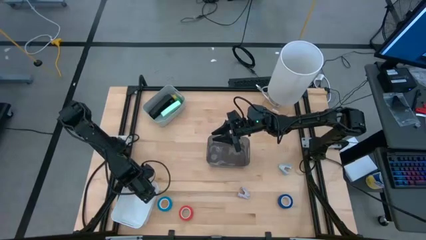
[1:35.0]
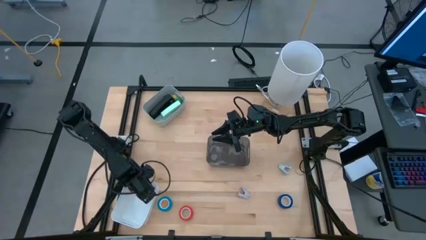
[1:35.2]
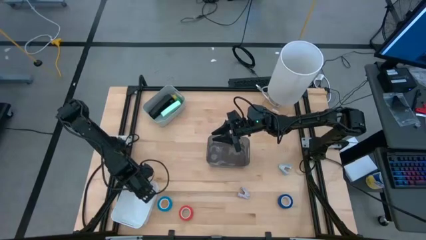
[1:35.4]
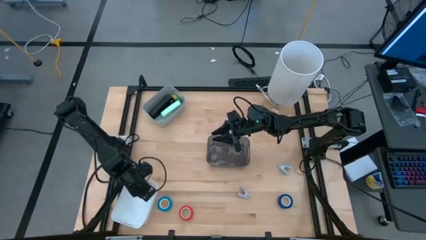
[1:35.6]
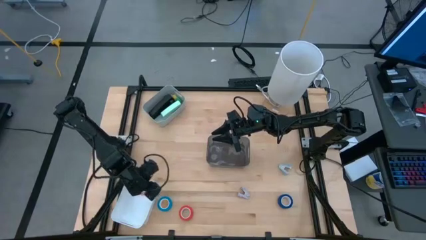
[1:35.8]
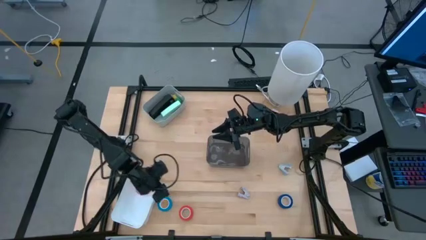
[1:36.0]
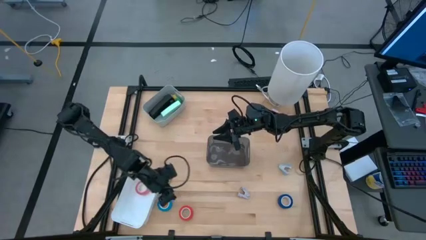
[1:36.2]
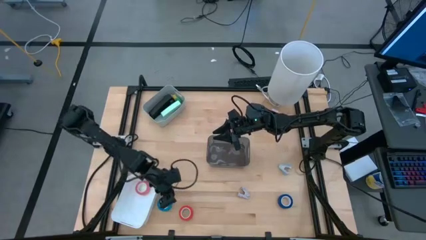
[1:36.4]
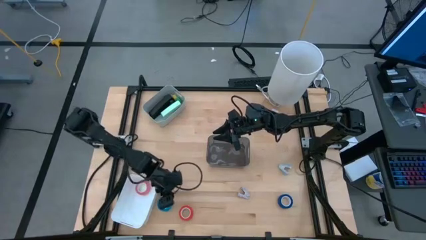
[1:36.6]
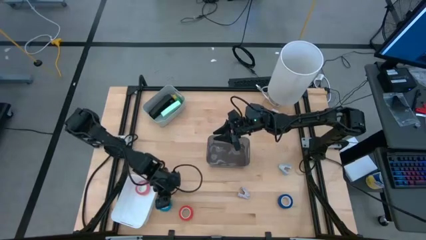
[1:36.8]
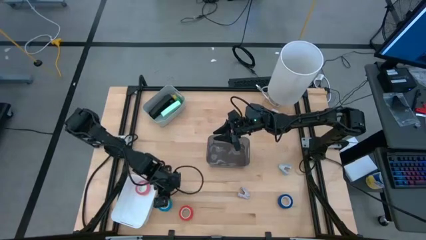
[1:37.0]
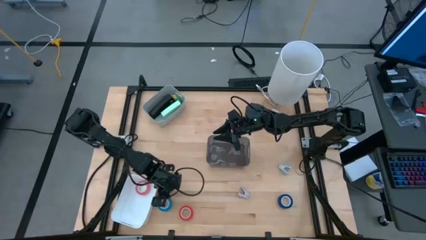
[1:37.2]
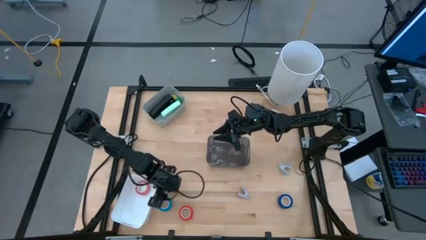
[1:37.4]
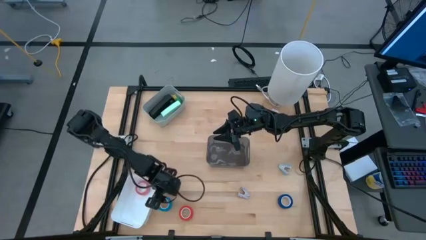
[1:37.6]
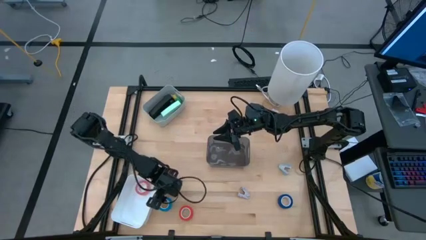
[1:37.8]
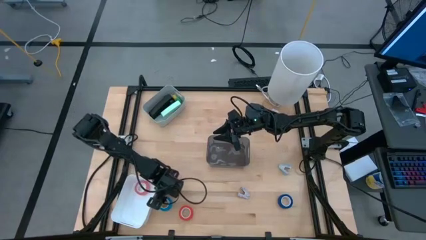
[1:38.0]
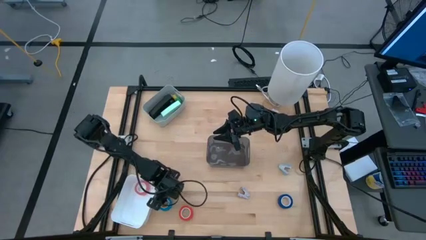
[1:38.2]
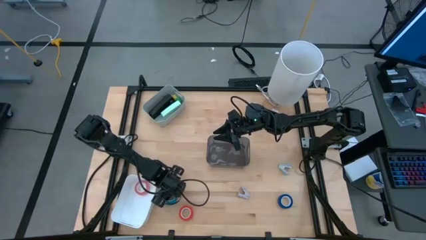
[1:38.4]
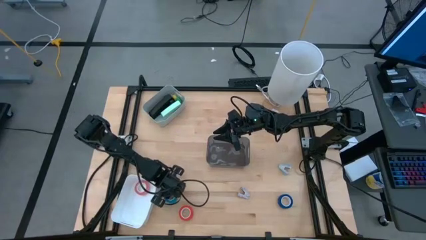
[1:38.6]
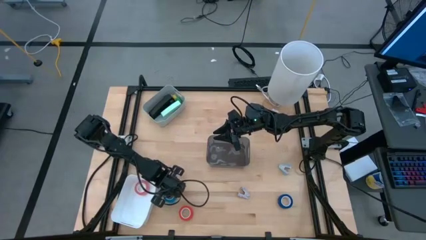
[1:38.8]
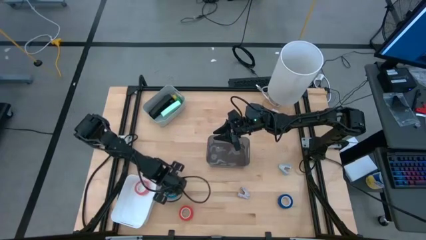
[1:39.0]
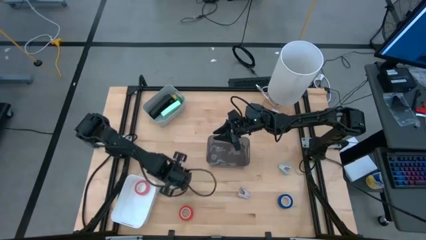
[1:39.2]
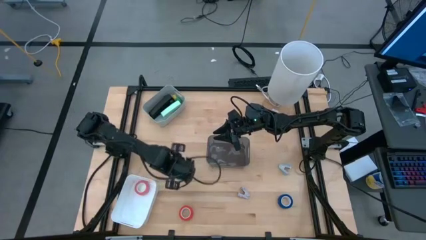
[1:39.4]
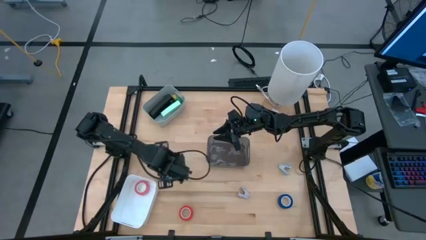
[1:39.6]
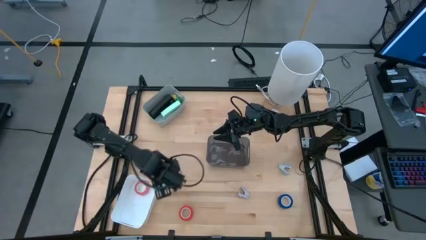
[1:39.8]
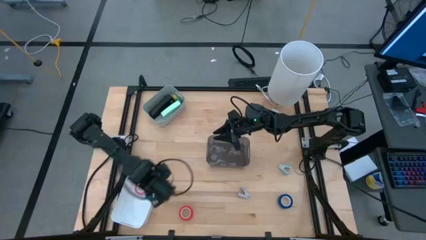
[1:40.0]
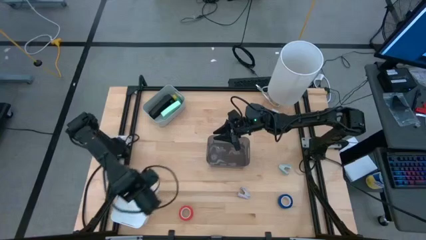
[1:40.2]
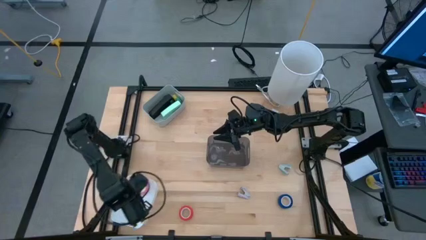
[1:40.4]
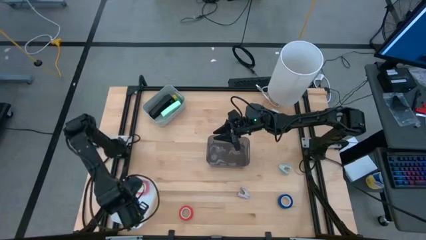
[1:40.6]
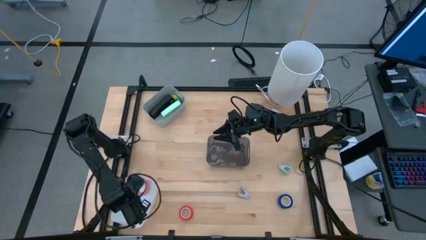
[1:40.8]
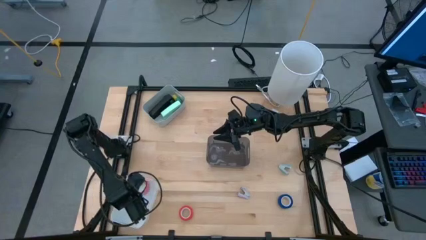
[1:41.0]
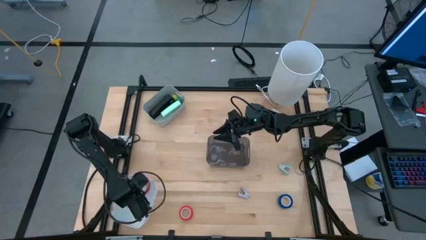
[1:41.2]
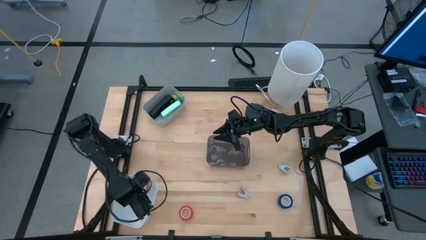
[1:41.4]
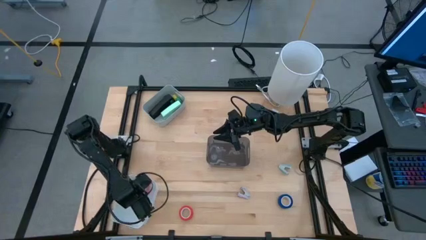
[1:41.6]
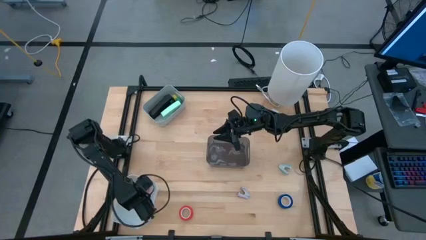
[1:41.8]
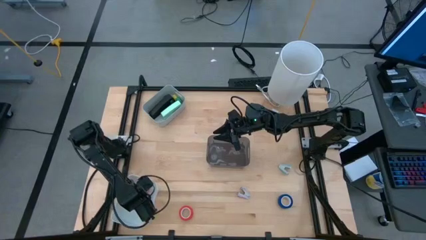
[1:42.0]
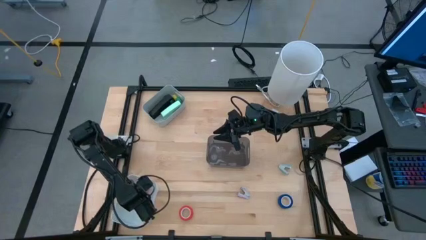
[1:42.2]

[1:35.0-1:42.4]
Task: Pick and place Stapler, Stapler remover, tape
Put the light blue tape into the white bin

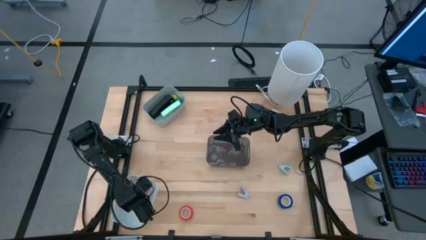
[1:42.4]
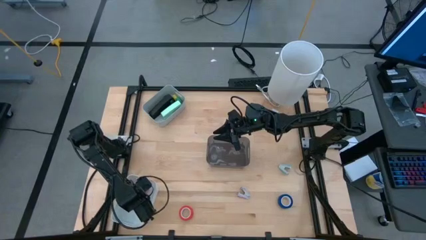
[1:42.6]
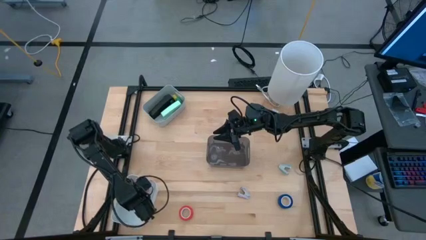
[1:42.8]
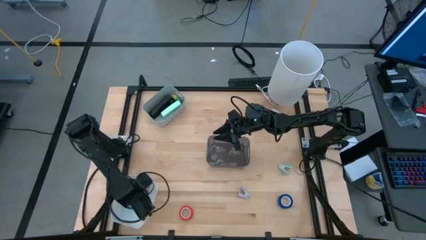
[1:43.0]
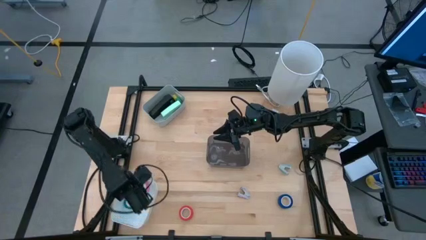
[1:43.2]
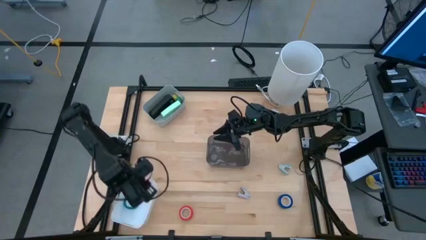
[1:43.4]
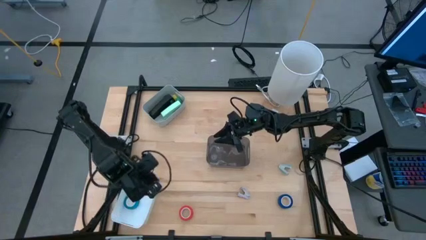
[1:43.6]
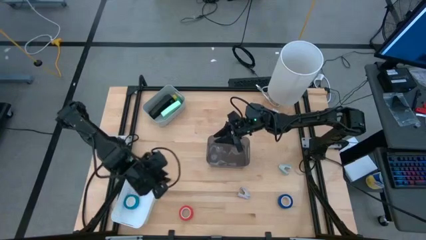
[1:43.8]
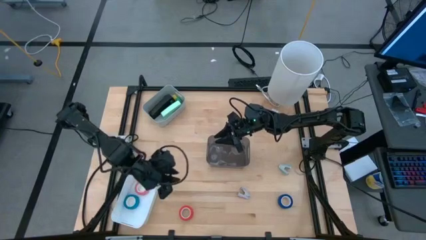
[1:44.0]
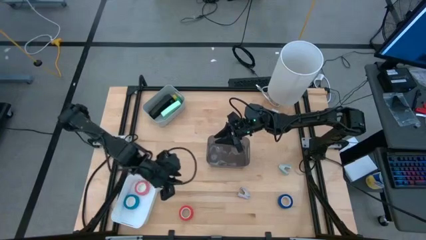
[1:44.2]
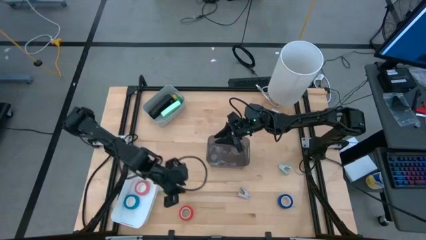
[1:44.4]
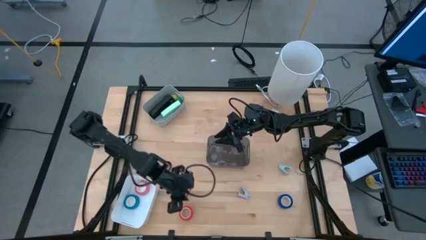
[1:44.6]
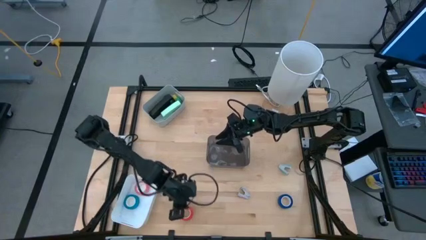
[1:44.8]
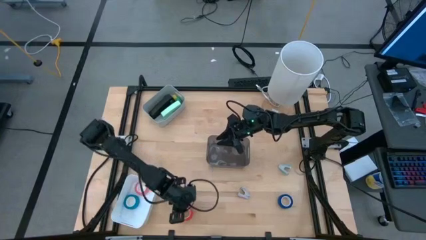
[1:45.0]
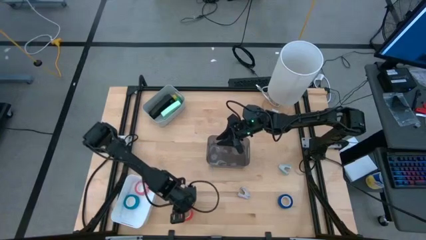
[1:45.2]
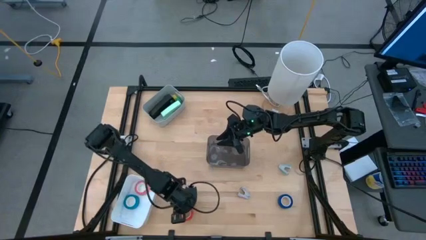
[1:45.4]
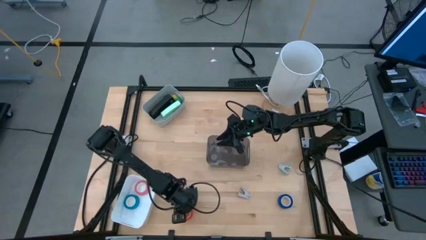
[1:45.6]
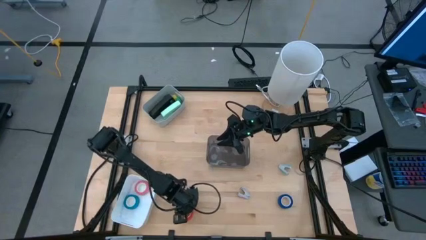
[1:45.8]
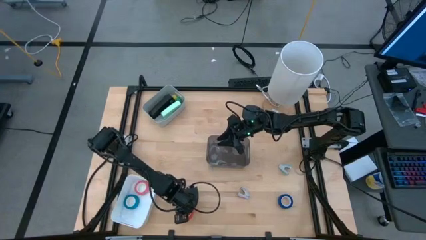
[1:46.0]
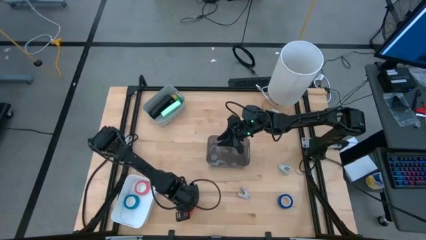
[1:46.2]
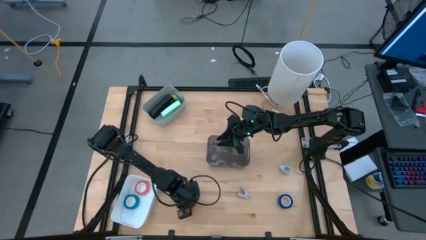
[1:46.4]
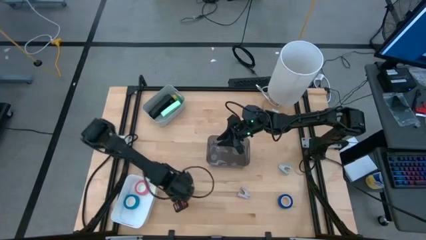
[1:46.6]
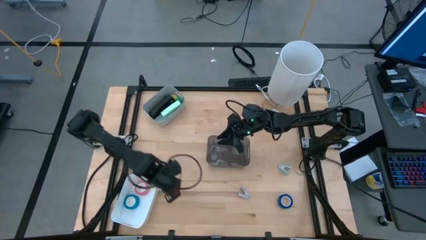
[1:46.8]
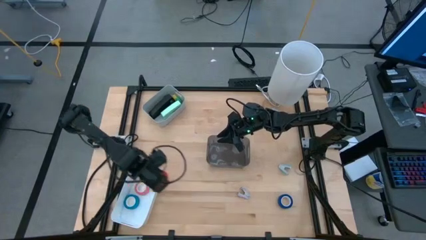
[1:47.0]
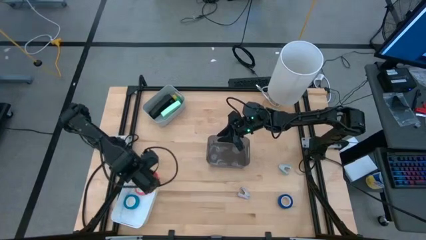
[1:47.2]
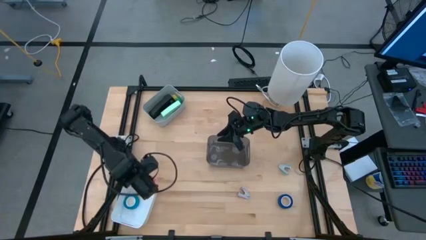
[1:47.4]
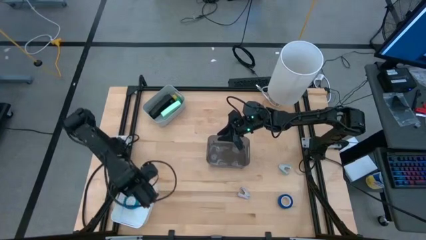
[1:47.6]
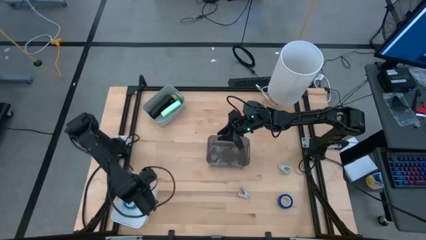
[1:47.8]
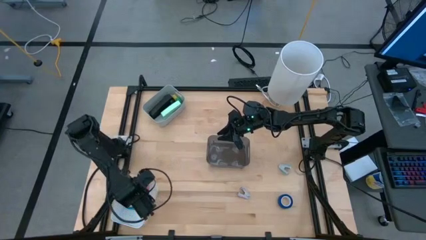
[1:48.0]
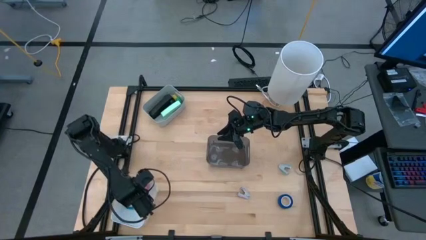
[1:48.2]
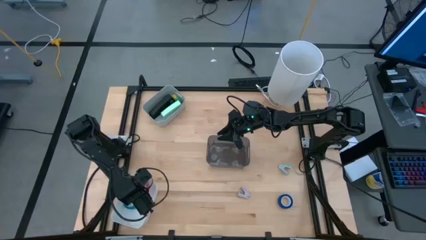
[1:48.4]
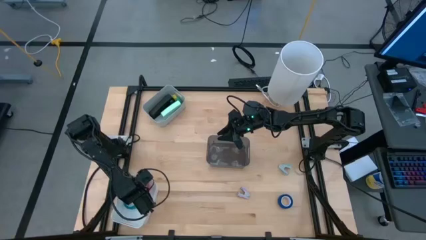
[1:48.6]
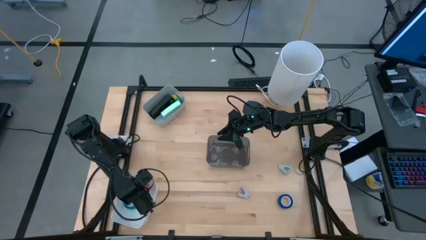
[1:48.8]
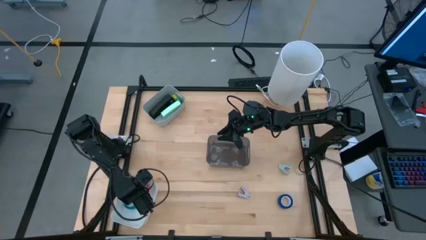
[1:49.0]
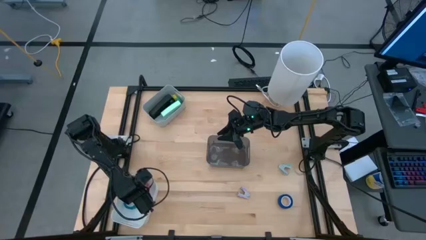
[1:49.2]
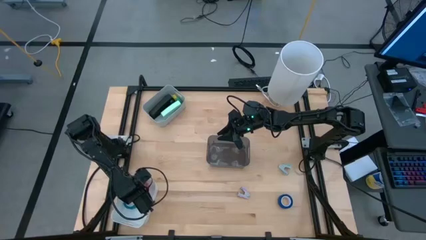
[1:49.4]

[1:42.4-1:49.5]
Put the orange tape into the white bin

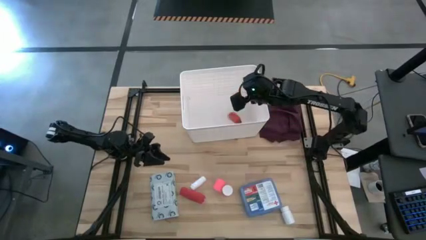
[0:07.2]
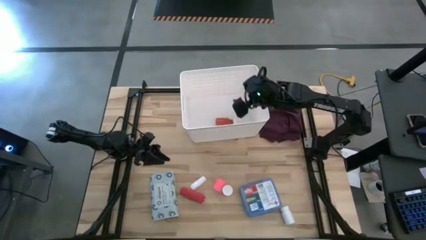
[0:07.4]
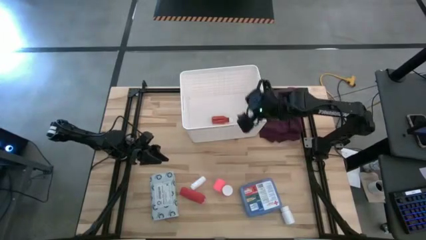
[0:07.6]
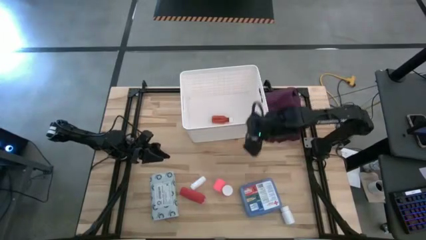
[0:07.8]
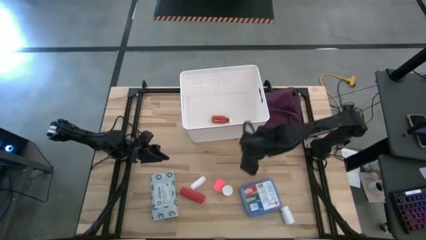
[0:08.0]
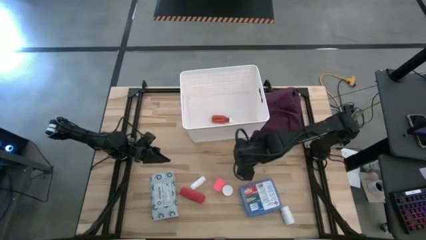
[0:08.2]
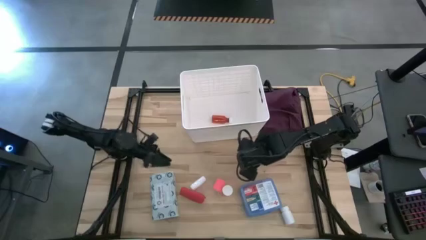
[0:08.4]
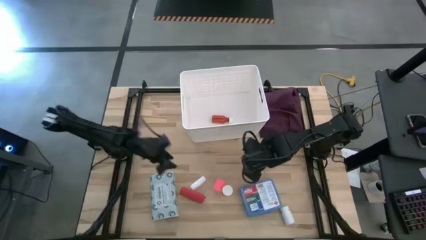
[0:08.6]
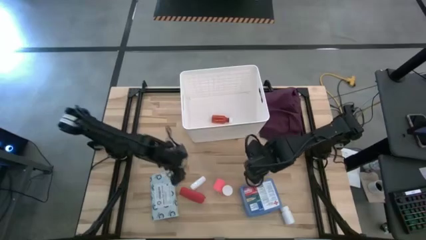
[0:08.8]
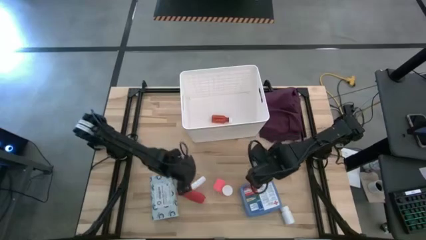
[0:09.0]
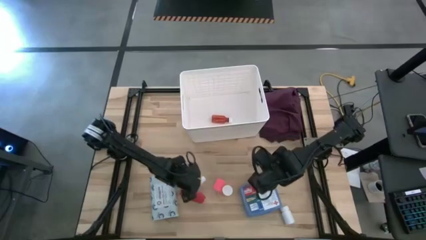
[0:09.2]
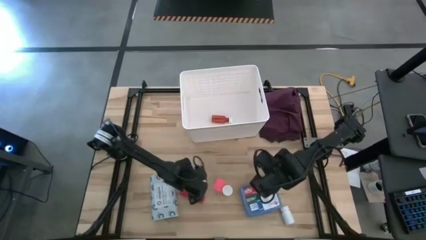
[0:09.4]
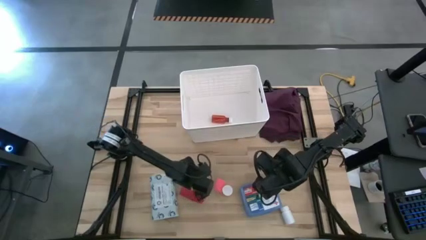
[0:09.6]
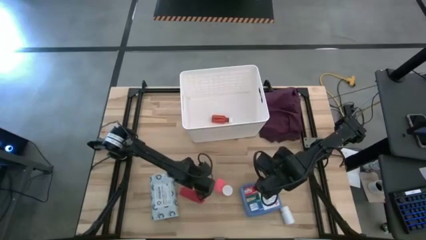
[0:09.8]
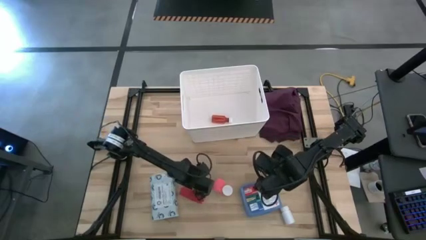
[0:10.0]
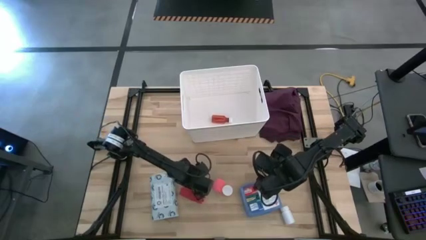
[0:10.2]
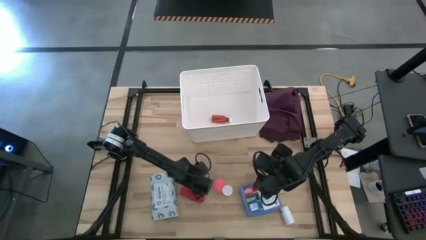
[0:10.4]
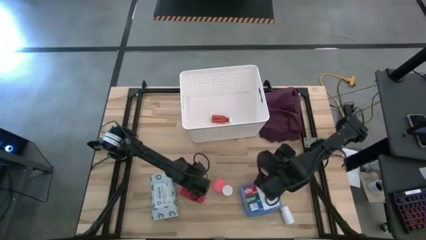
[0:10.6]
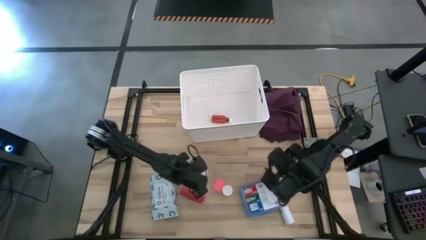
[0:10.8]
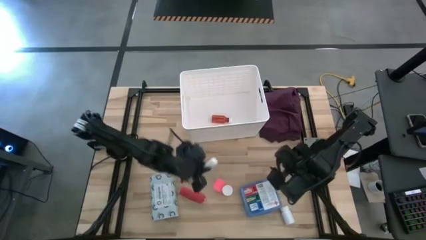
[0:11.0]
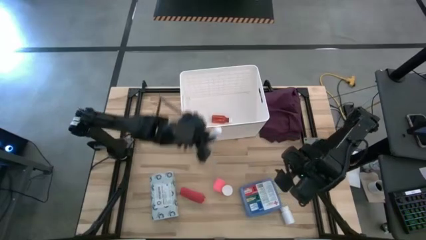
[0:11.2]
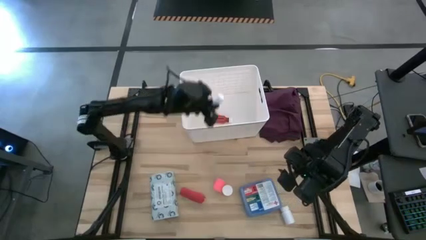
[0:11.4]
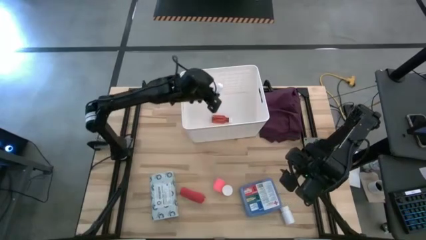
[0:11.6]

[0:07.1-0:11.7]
Task: Pick & place medical supplies in basket/bin
Put the white rolled gauze into the white bin
